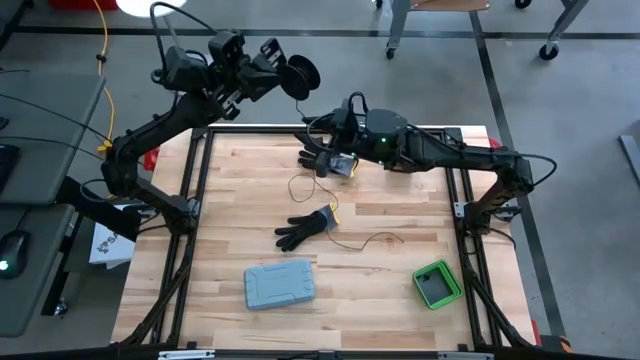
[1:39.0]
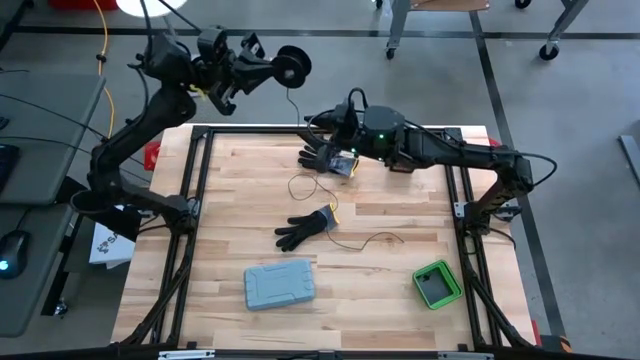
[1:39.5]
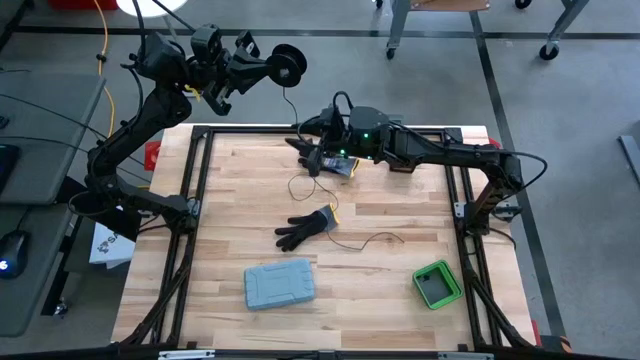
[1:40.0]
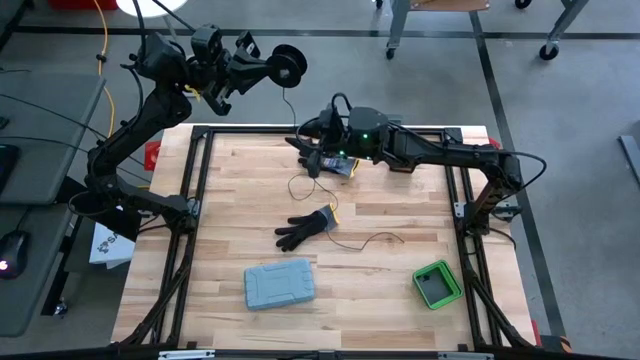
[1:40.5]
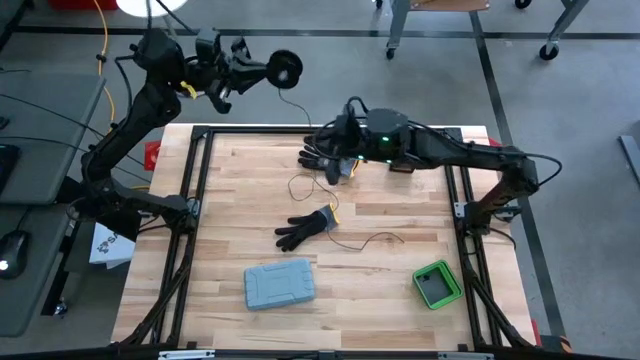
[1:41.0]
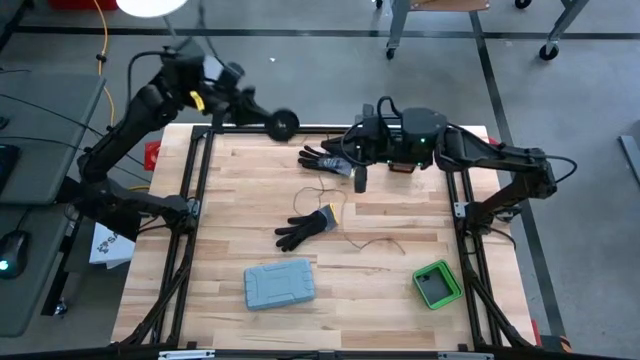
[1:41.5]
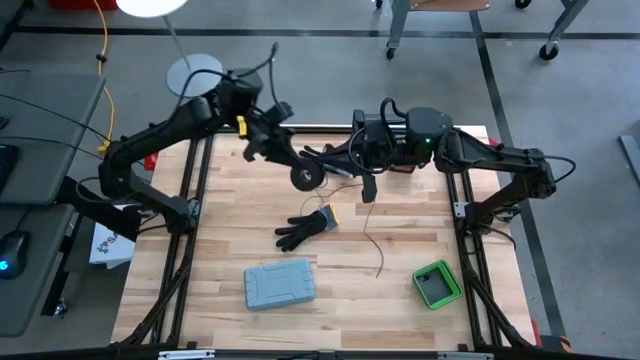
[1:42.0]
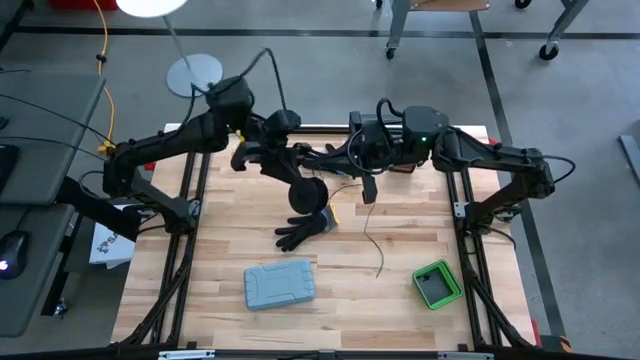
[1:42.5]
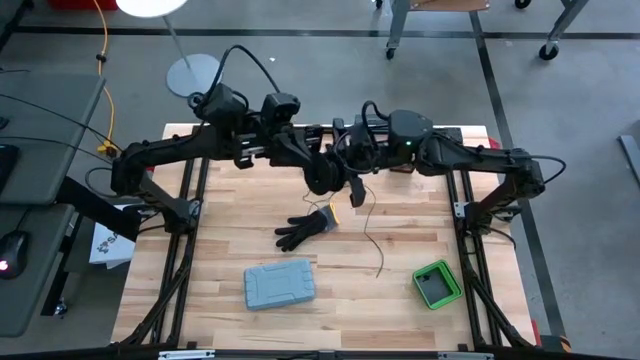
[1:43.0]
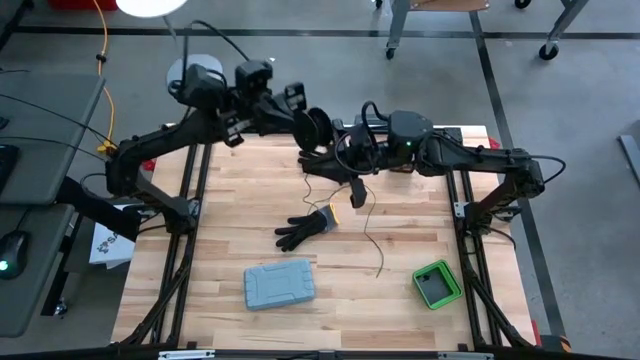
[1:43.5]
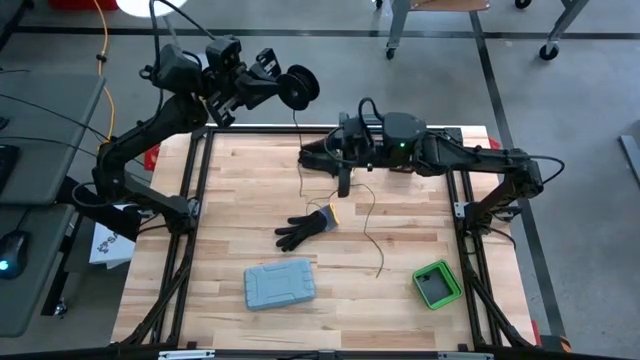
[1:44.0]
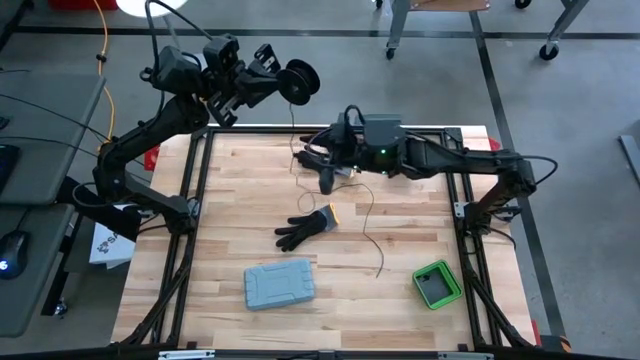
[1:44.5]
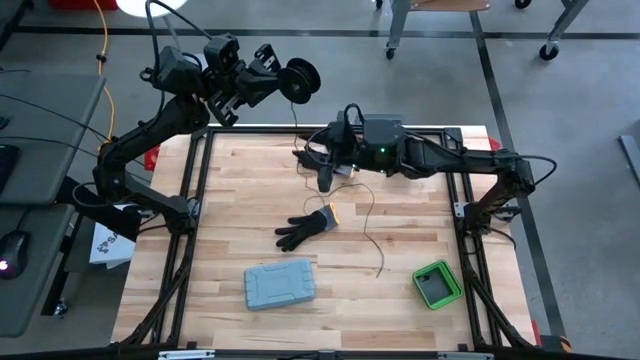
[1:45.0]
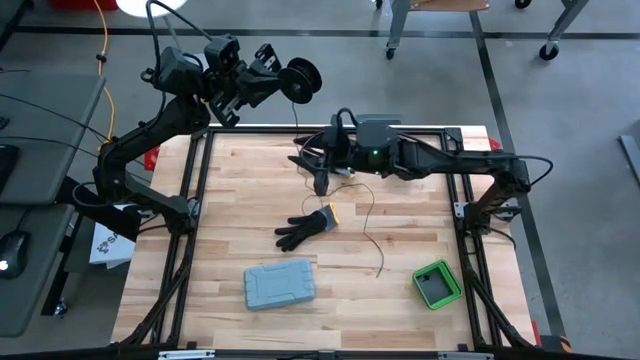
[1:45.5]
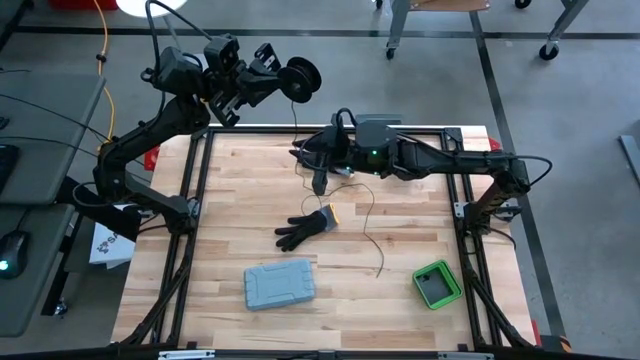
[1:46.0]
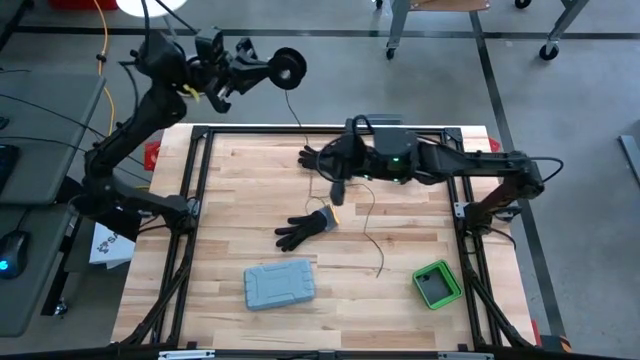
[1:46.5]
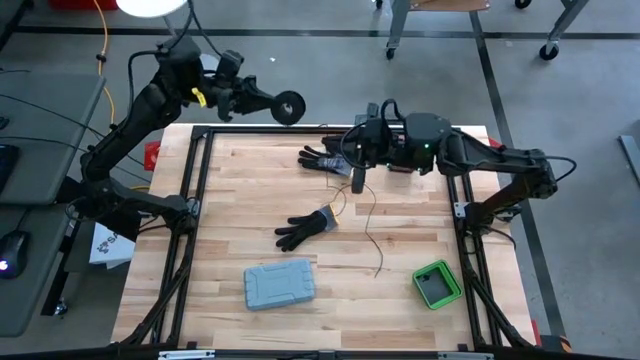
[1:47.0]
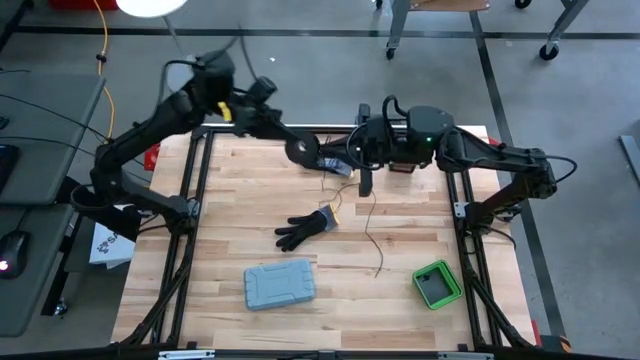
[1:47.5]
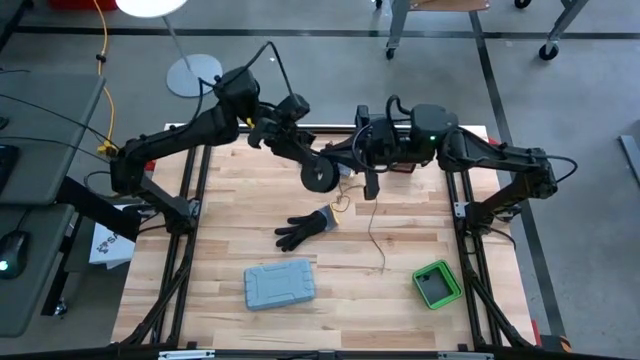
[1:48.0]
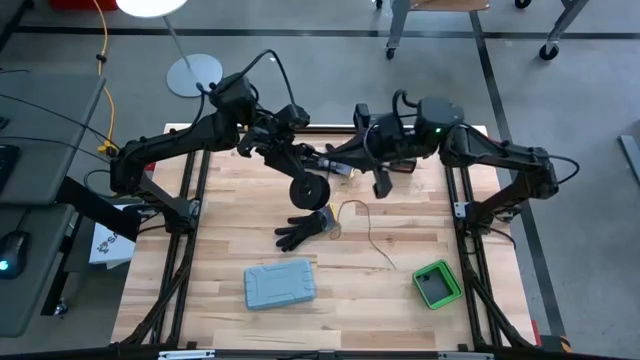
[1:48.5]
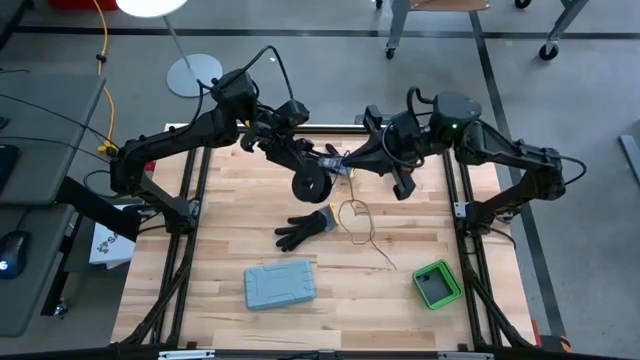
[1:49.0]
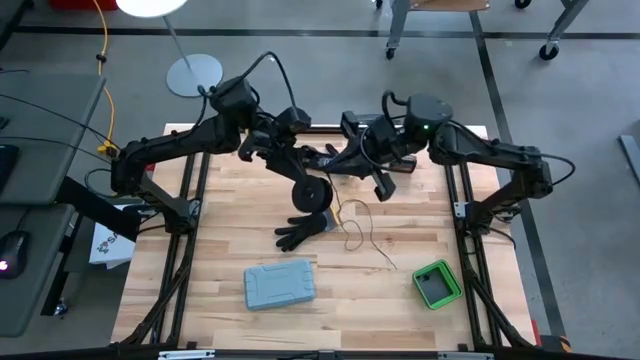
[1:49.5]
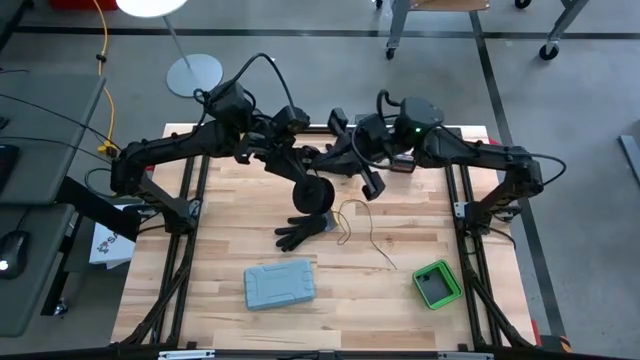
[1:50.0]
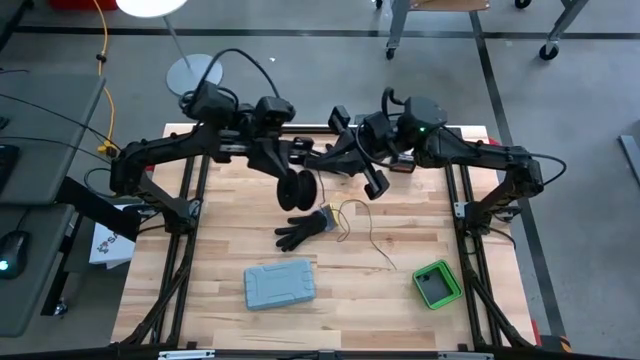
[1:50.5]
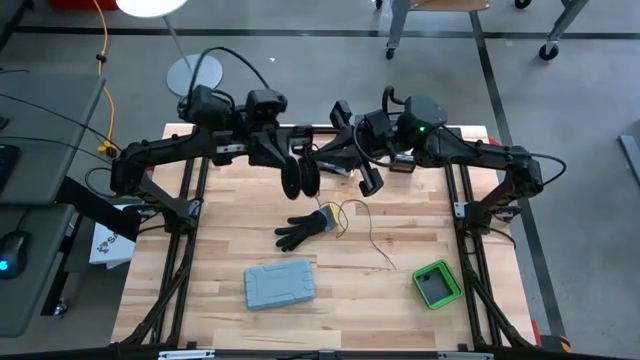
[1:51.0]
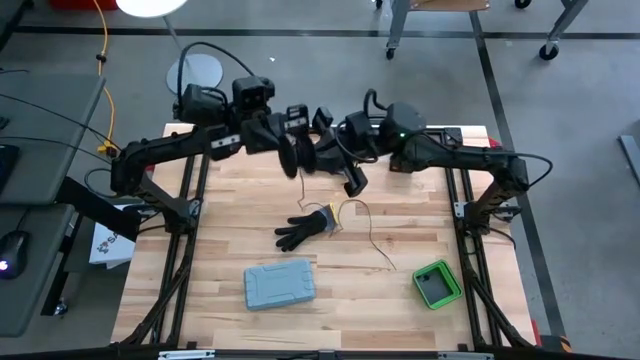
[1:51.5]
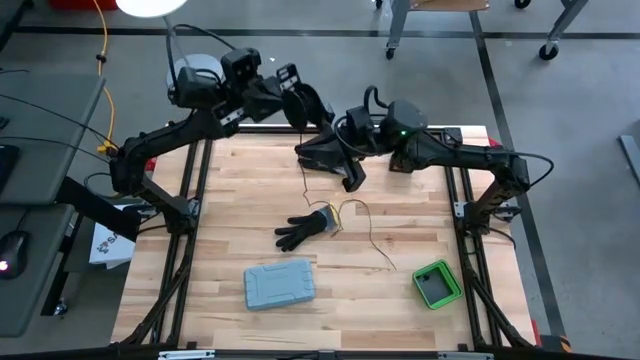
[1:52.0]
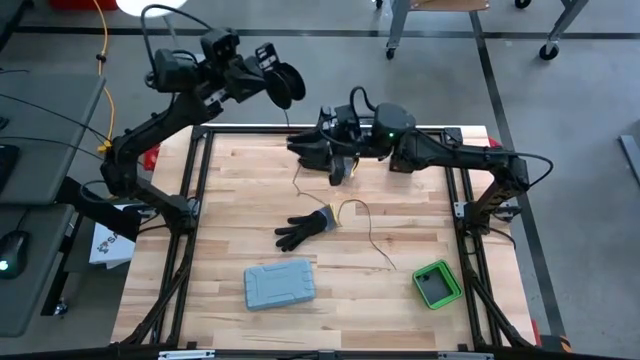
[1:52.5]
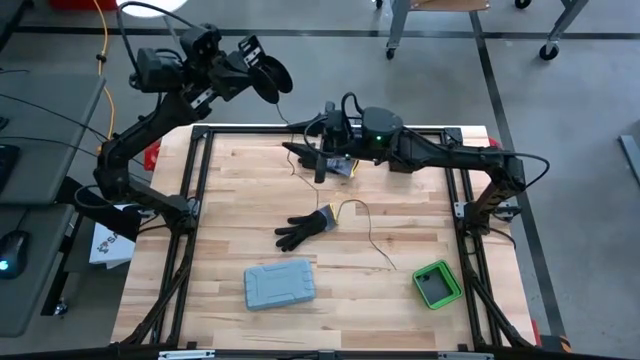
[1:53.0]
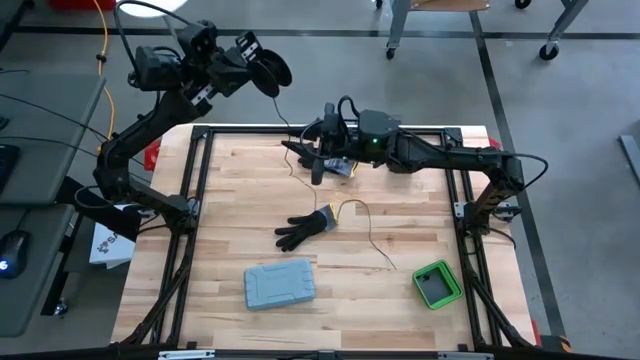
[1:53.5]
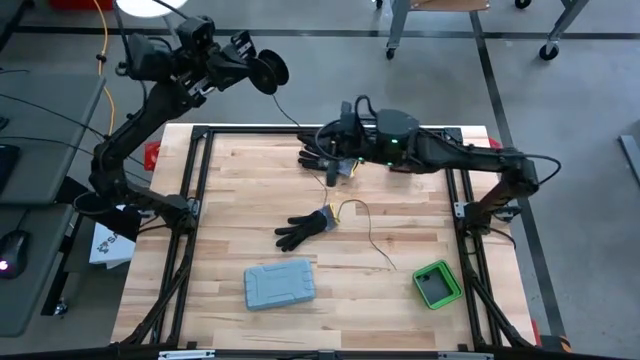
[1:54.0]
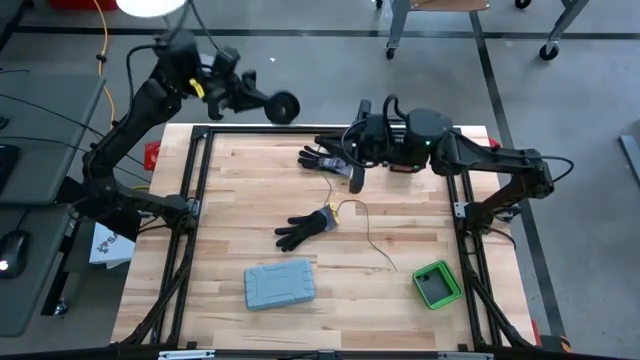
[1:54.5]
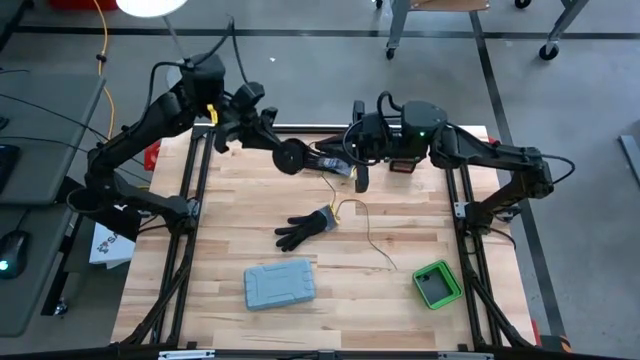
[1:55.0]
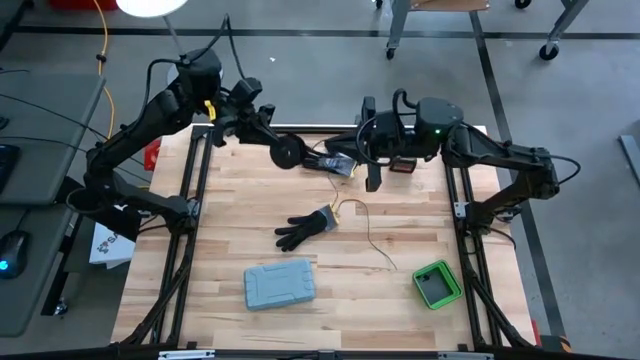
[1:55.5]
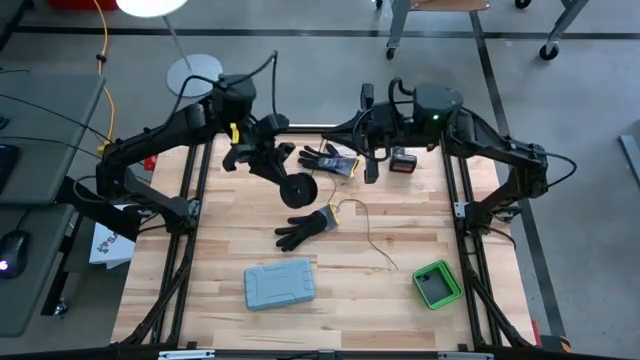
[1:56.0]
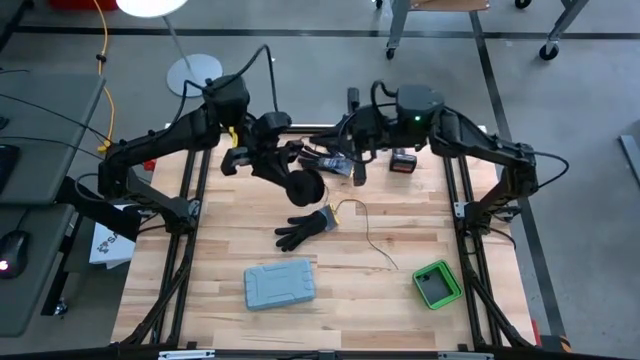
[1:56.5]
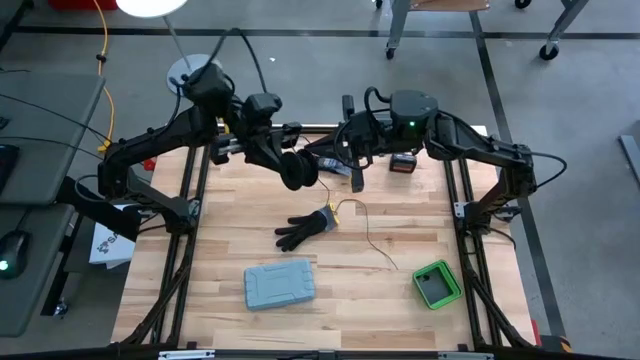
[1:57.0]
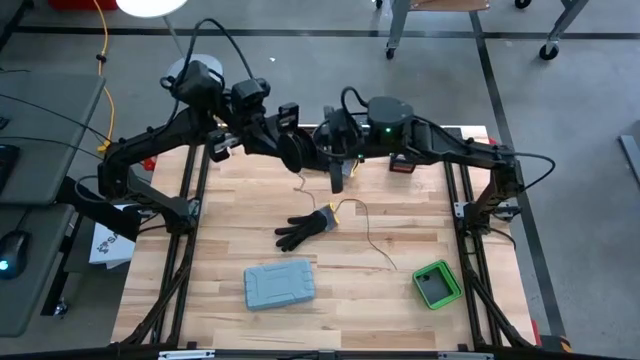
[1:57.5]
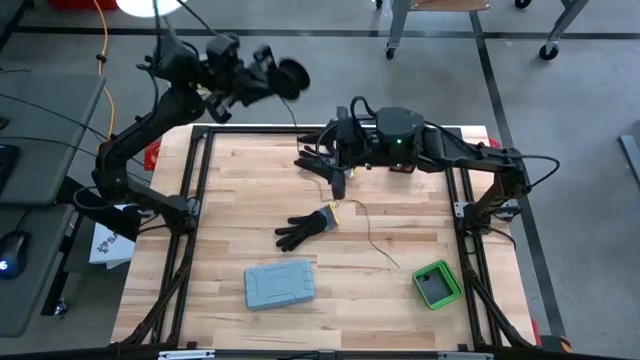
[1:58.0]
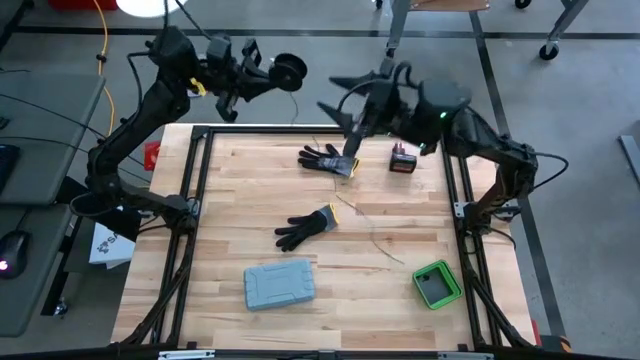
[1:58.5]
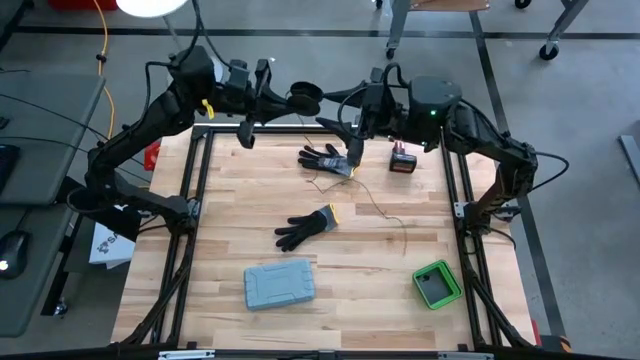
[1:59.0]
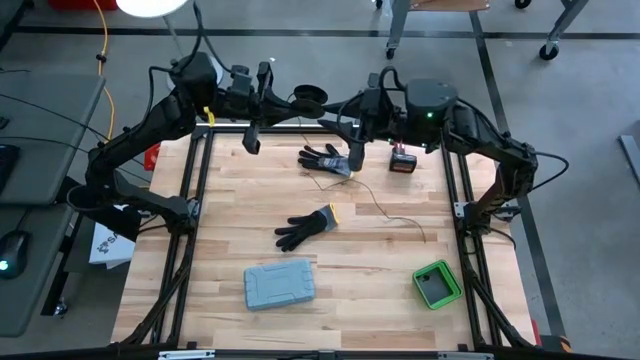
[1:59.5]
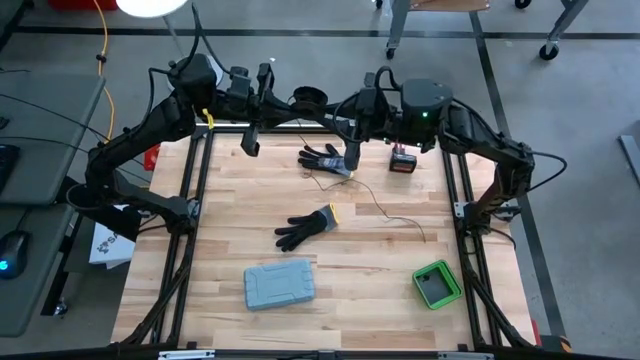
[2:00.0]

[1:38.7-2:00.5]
Task: Coil cords
Coil the black wire cable onto the black spool
